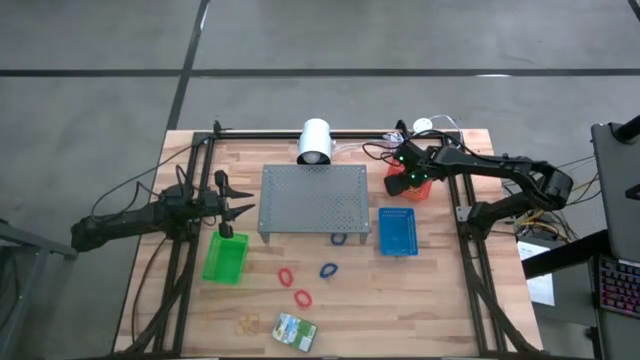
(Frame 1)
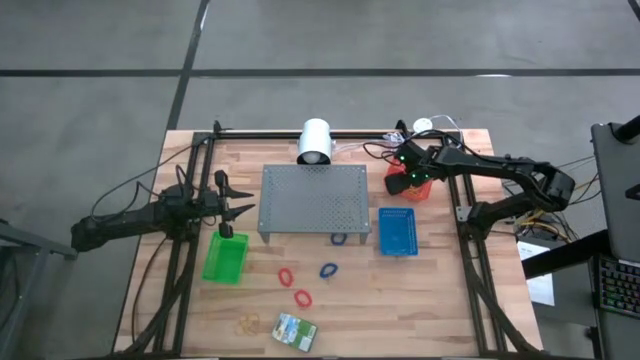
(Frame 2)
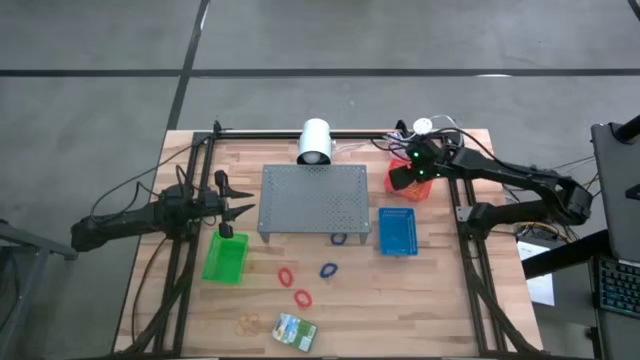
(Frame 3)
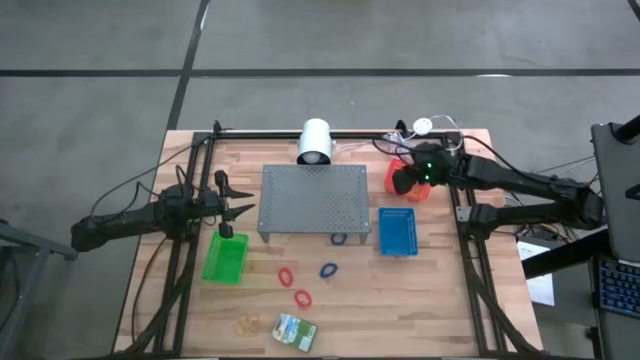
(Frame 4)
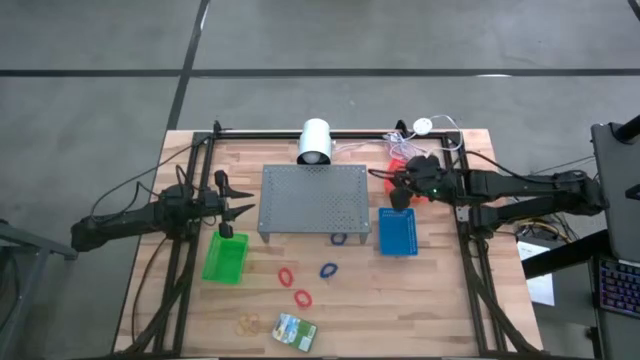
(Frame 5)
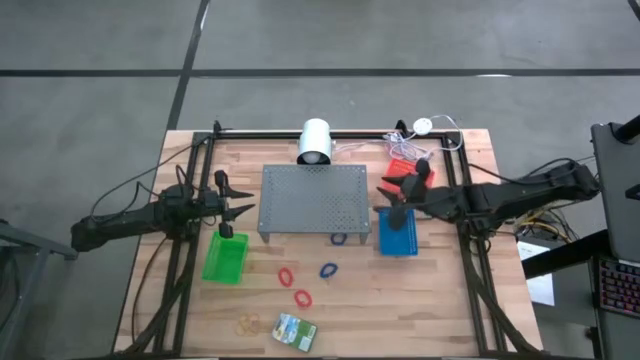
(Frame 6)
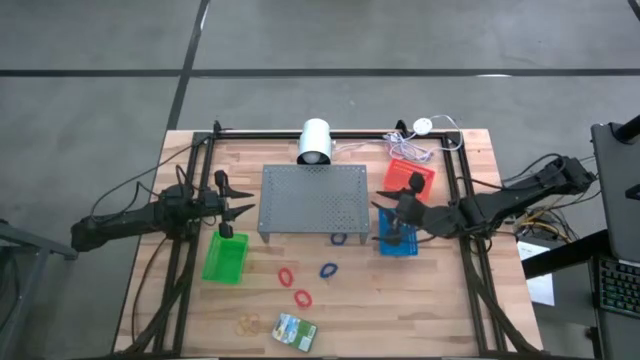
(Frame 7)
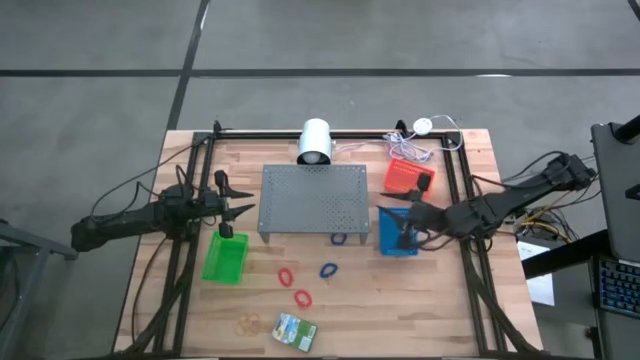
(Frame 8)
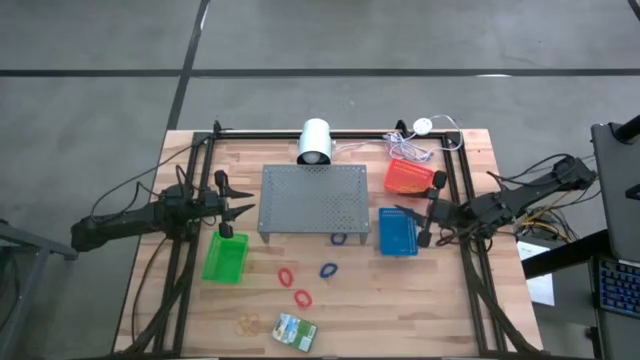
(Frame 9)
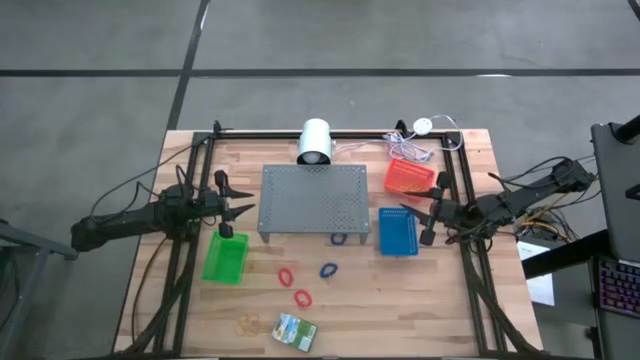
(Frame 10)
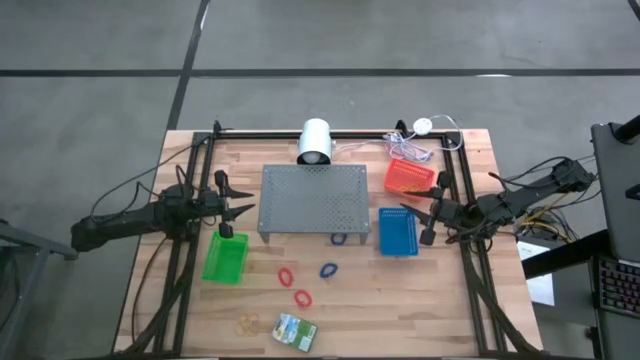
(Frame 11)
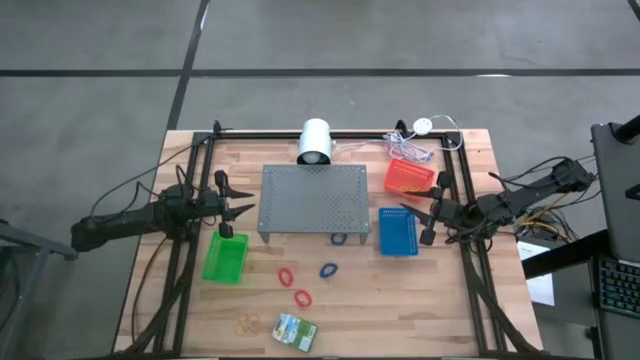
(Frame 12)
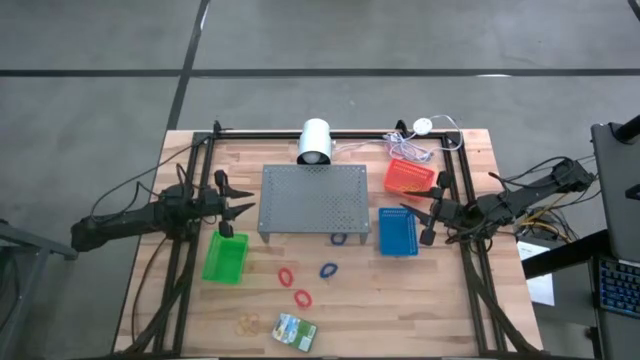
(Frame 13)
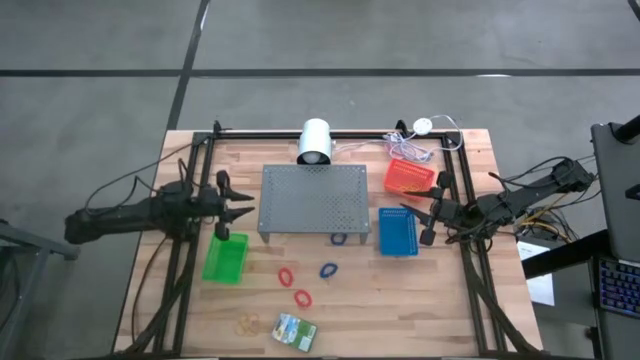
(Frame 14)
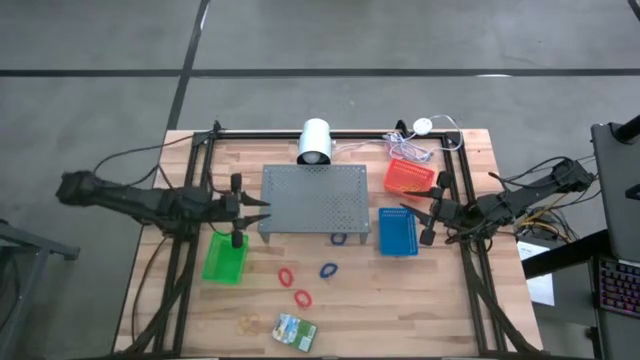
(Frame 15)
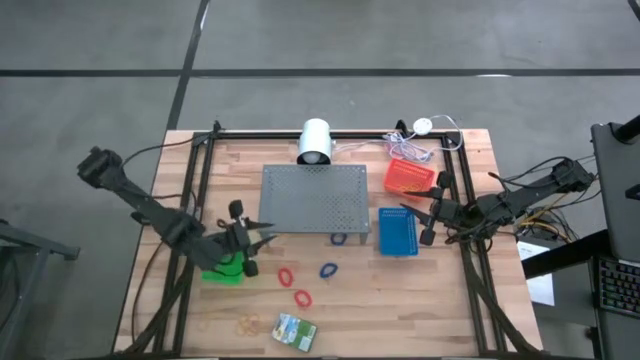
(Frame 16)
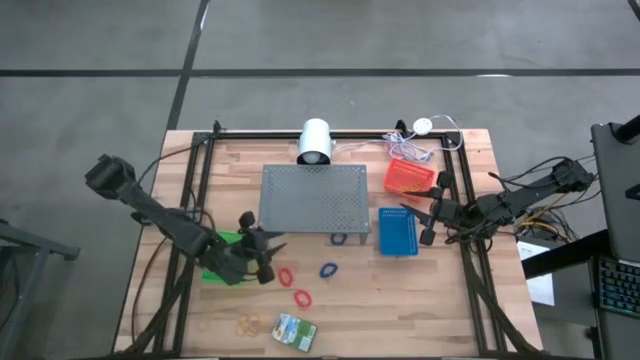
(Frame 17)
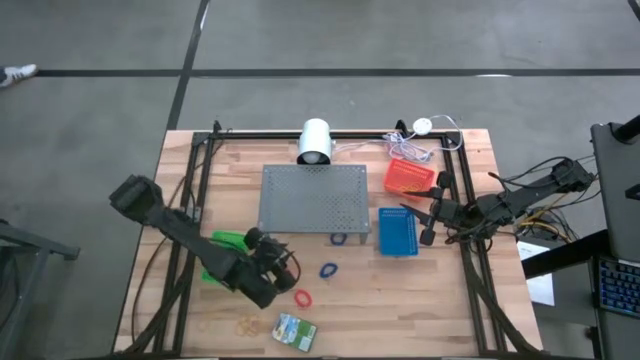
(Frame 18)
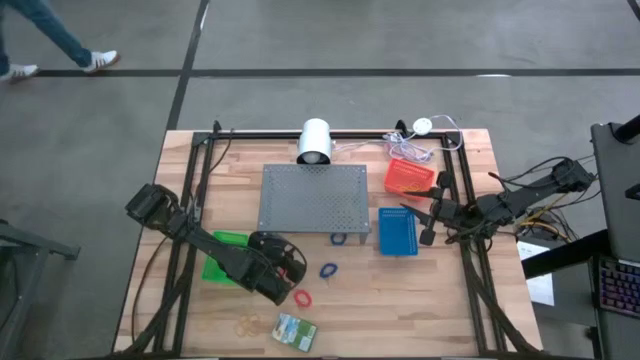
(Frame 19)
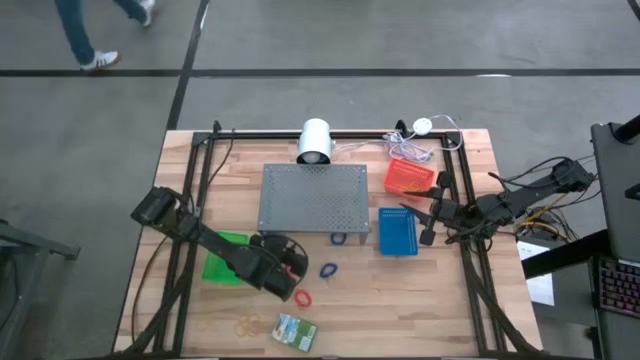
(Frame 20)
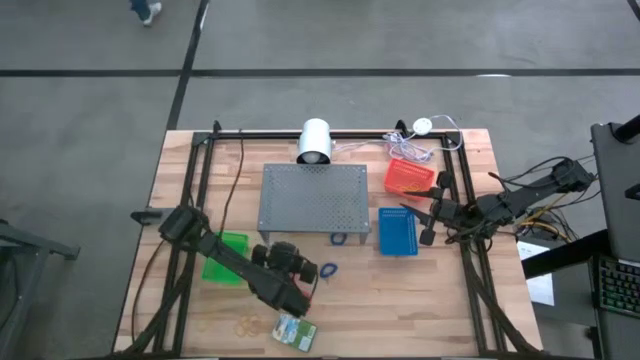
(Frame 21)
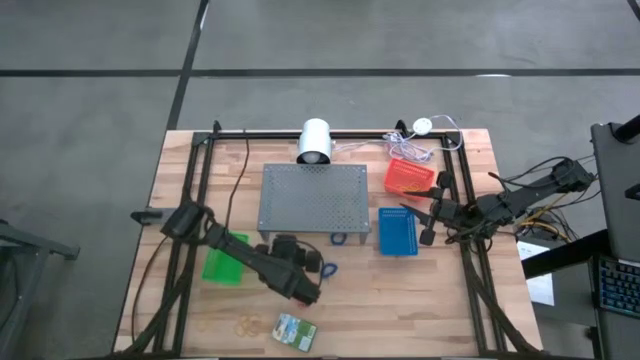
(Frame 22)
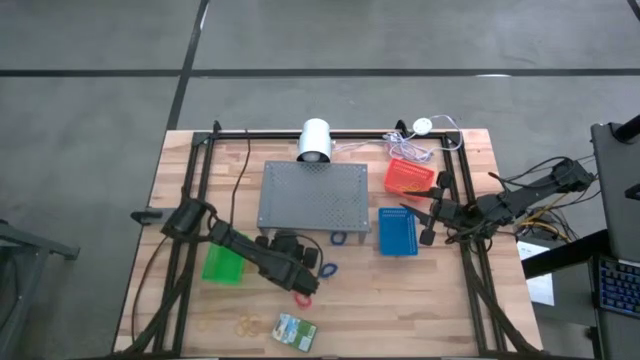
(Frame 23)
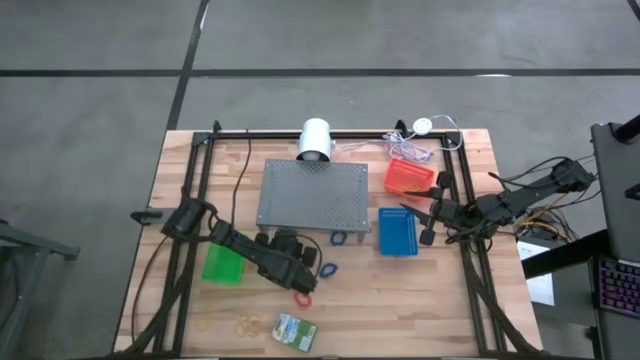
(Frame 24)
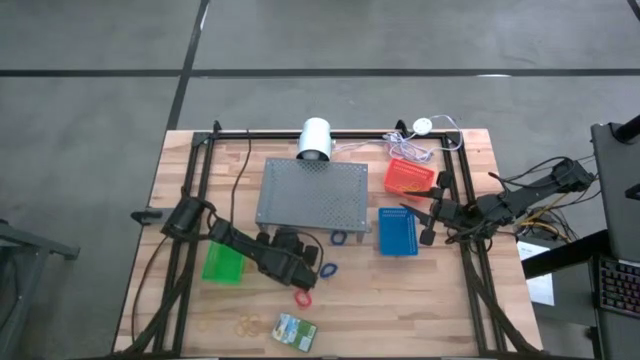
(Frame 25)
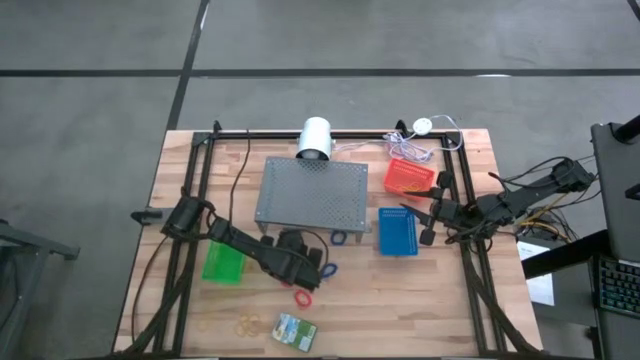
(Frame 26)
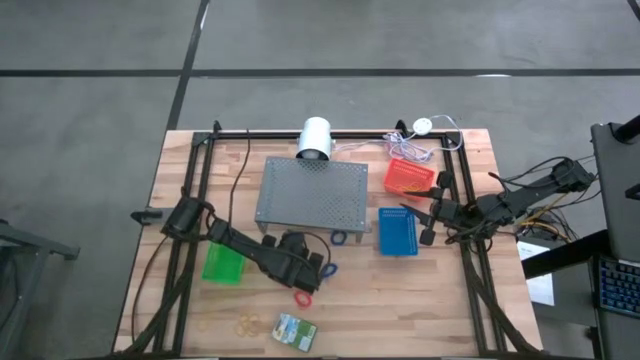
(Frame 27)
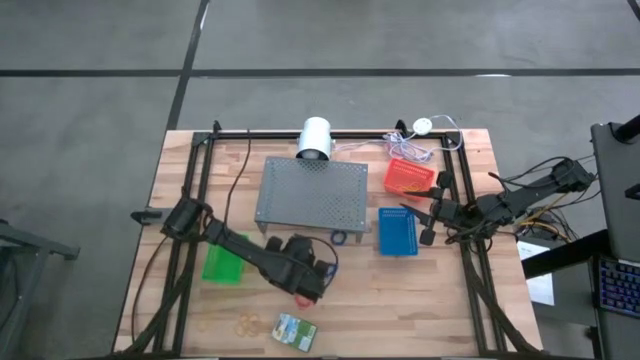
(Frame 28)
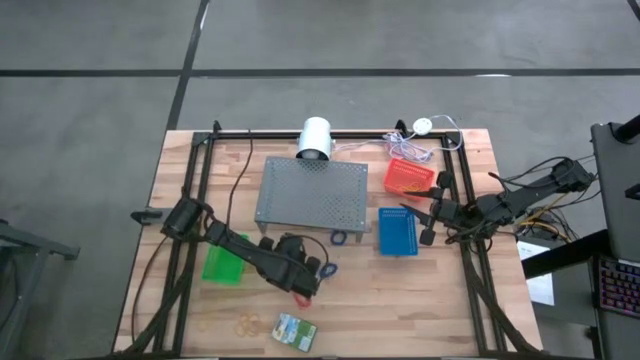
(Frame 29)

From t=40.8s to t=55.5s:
Task: Pick & Place Office Desk Supplies
Put the yellow rubber band into the orange bin

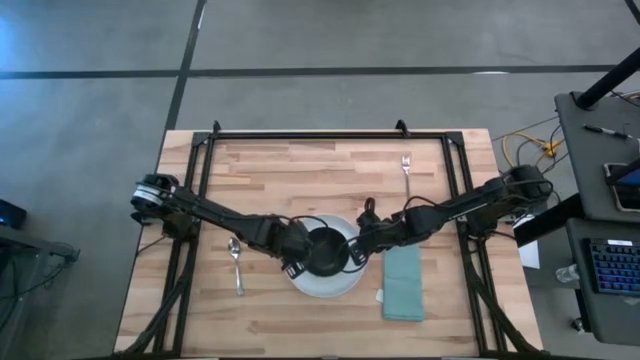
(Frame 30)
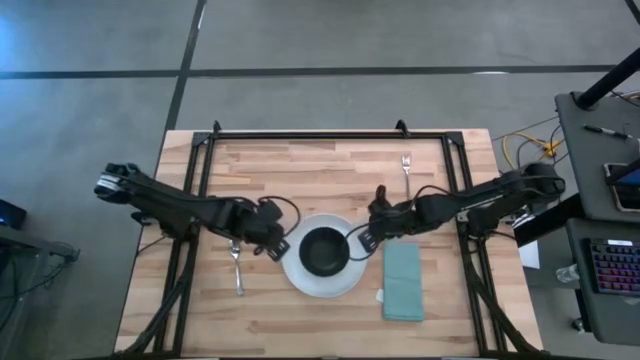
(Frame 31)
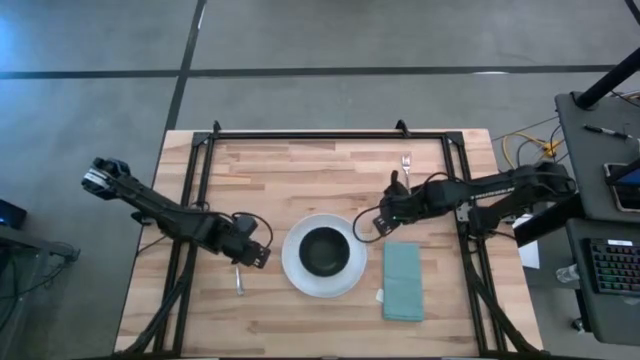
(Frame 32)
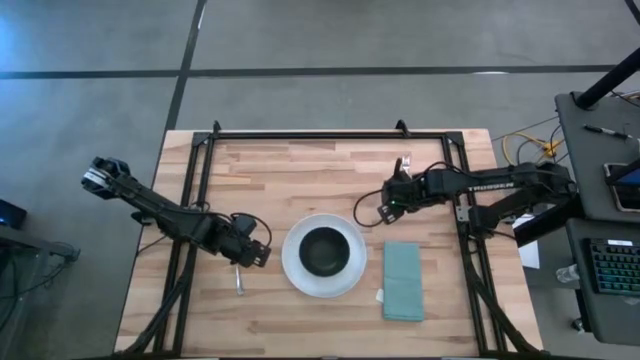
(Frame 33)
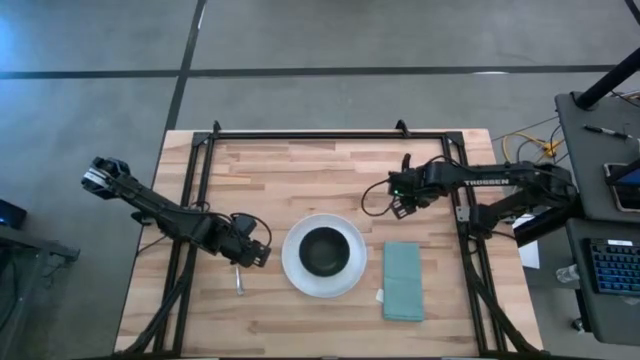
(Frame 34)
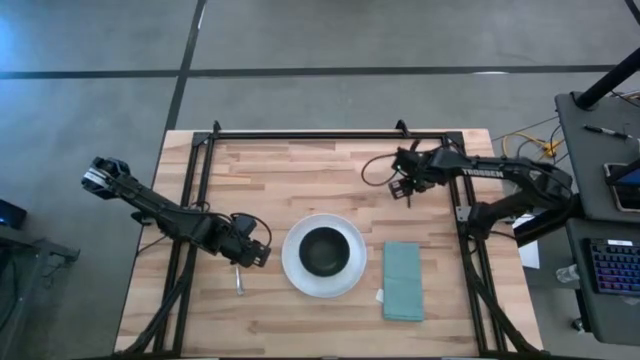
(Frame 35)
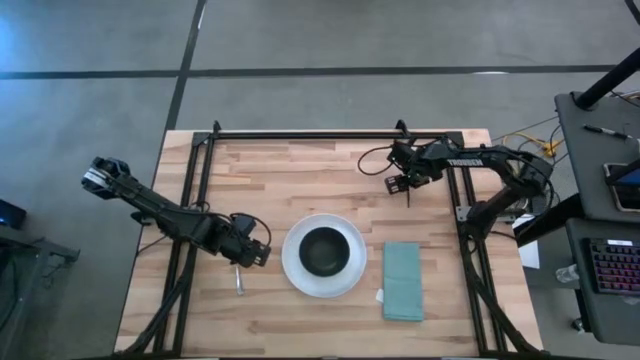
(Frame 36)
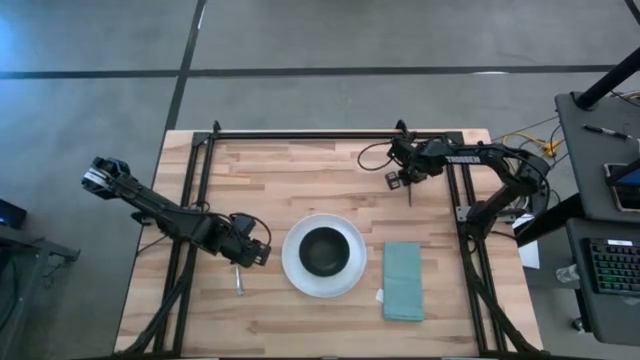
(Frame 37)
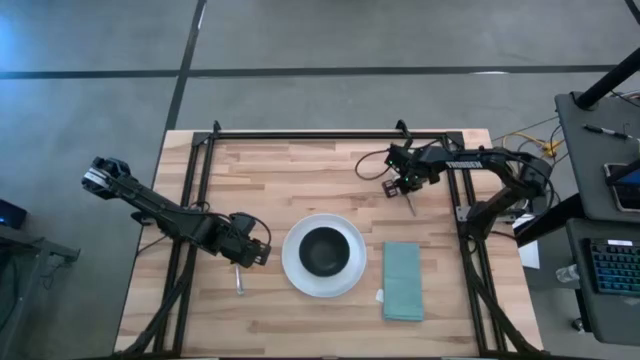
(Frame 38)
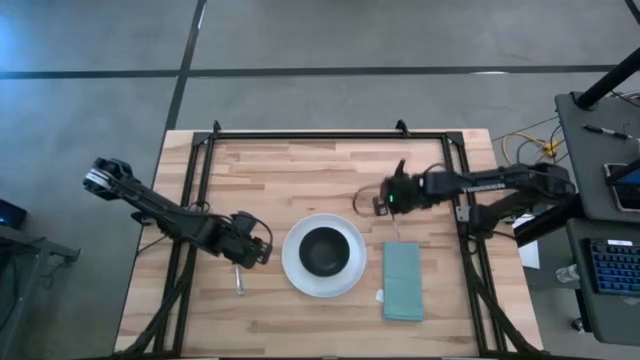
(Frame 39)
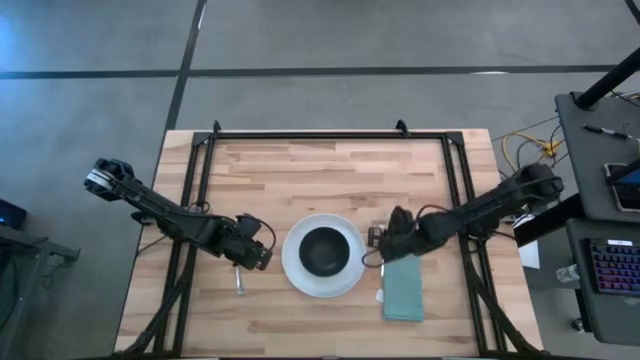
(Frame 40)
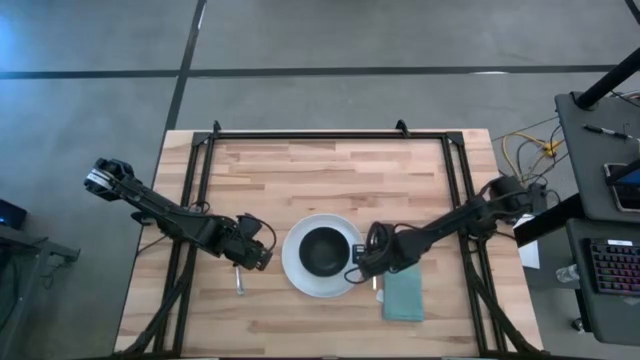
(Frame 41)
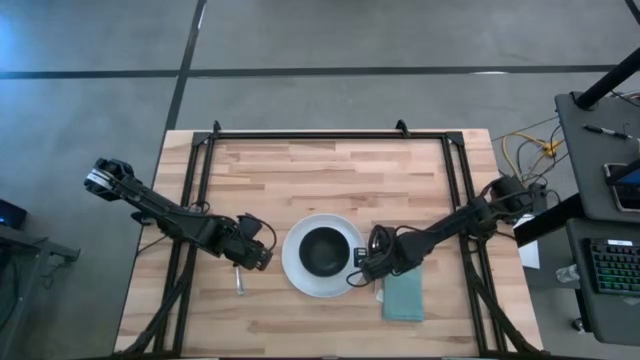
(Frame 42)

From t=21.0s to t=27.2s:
Task: Set table place
Put the silver fork on the table to the right of the white plate
